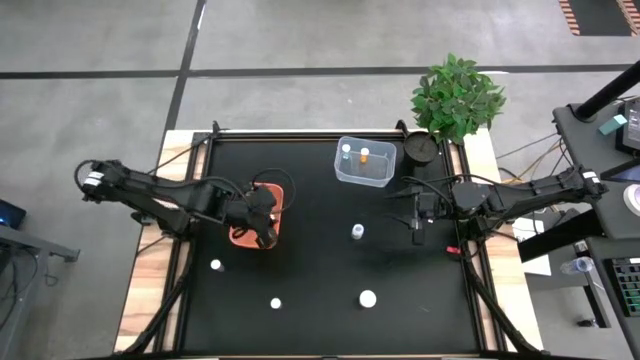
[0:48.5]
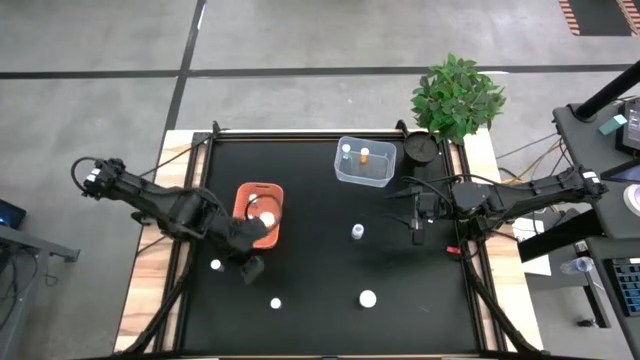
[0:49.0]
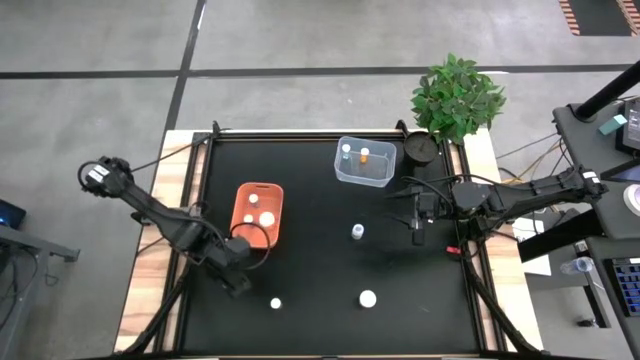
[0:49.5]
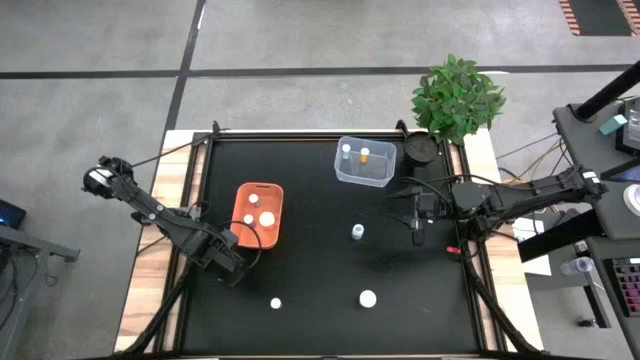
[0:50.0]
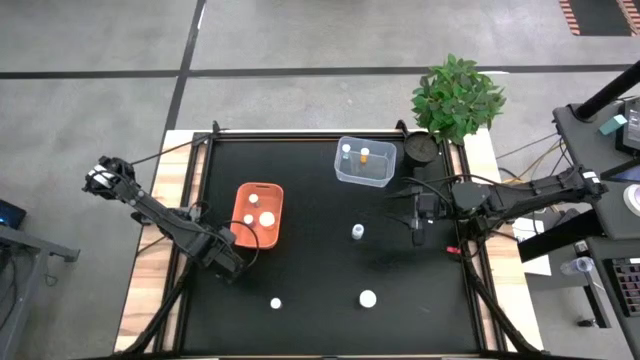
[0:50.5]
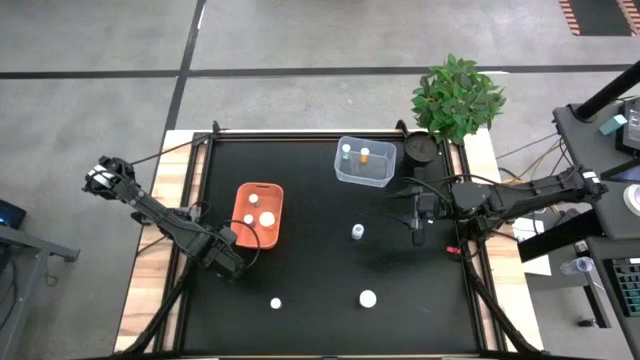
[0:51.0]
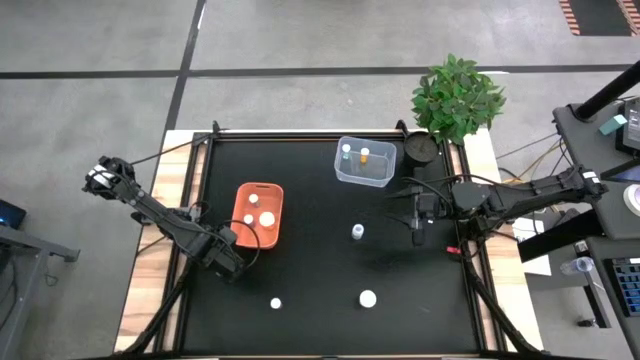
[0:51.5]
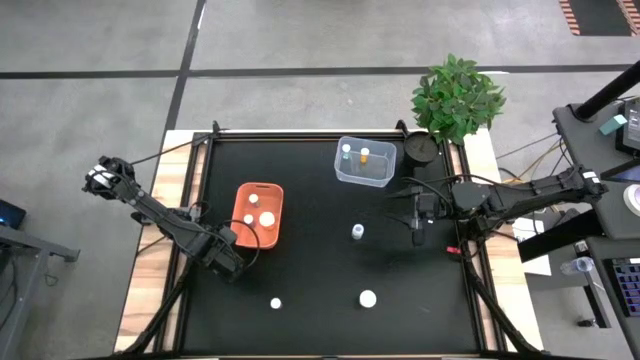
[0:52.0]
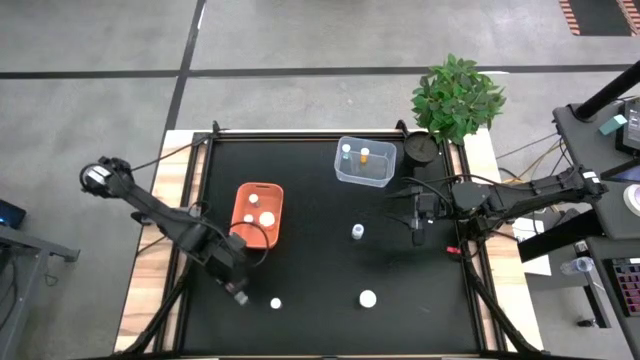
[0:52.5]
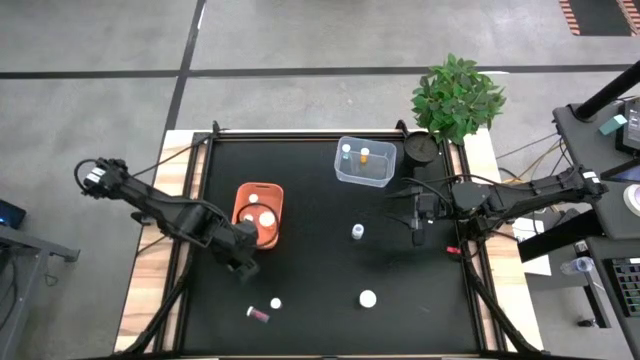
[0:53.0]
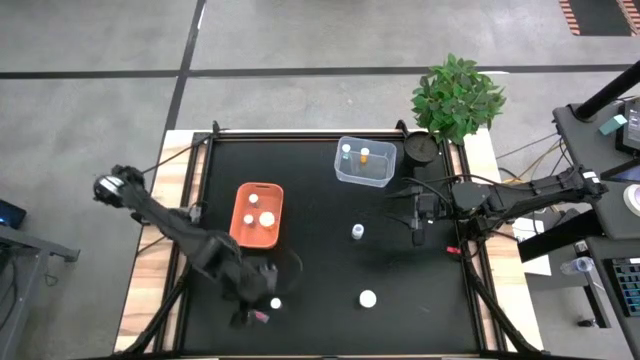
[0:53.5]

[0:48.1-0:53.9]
Task: Pick and place medicine bottles into bin by pill shape (circle, oval)
Put the blue capsule pill bottle into the orange bin

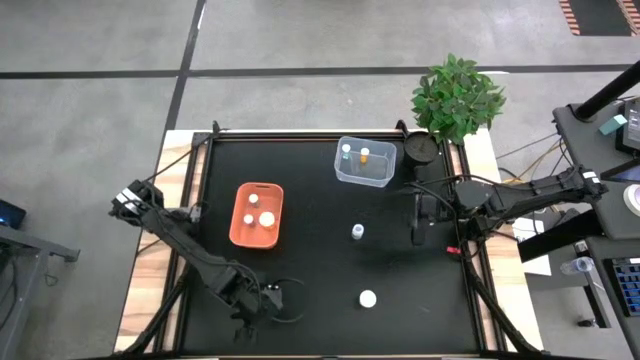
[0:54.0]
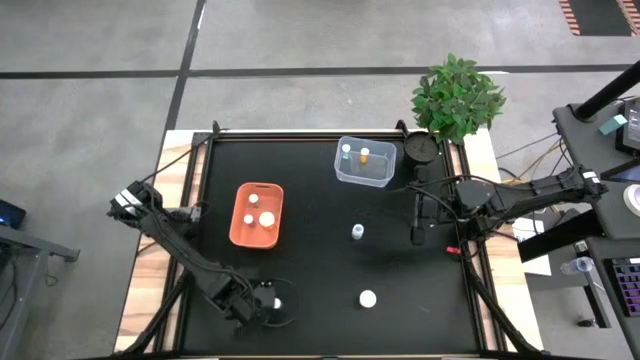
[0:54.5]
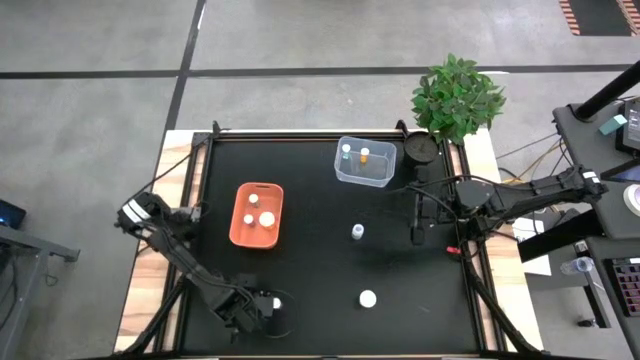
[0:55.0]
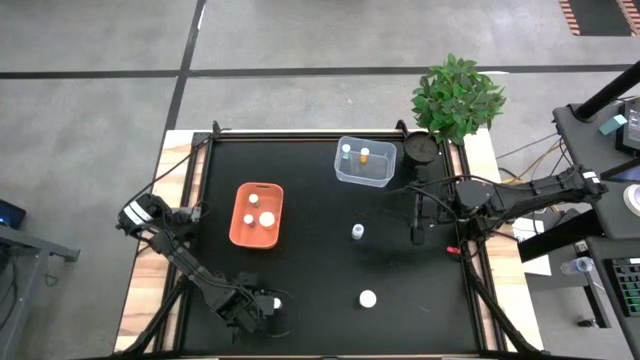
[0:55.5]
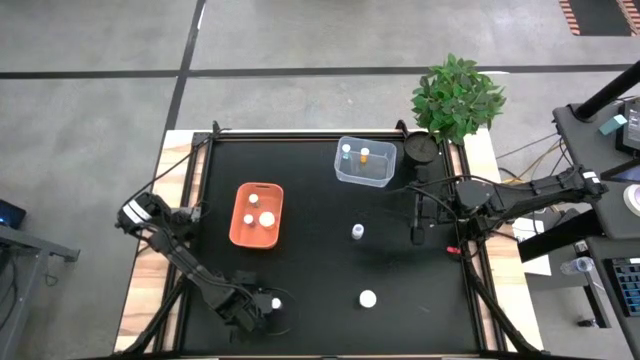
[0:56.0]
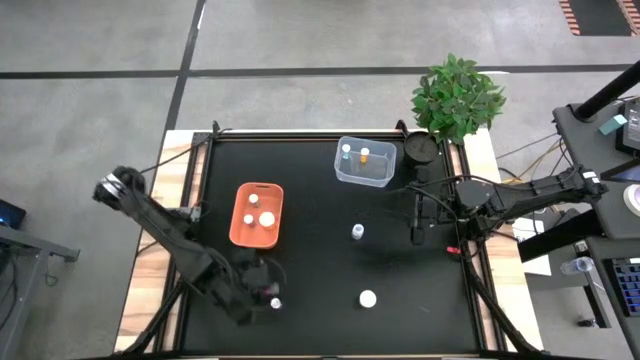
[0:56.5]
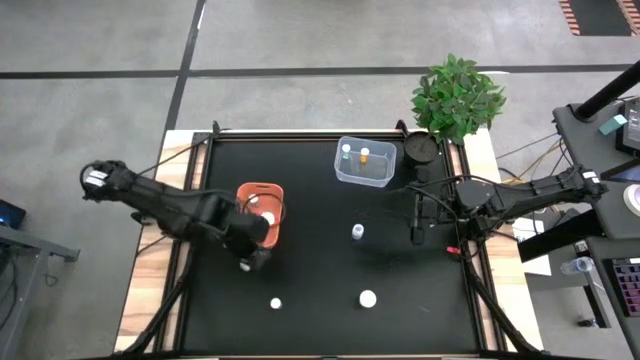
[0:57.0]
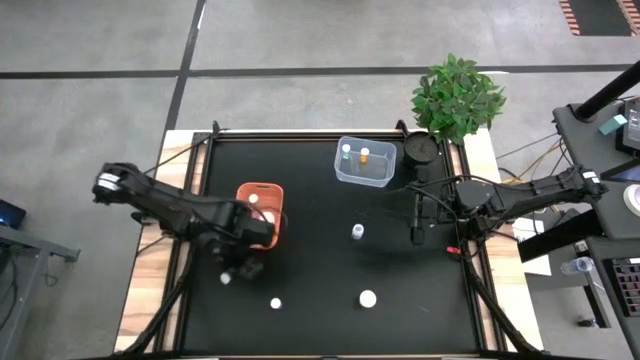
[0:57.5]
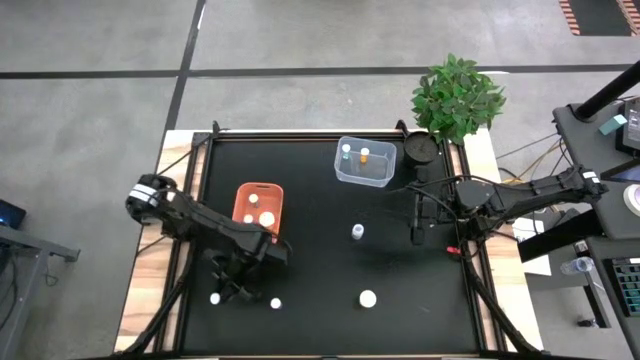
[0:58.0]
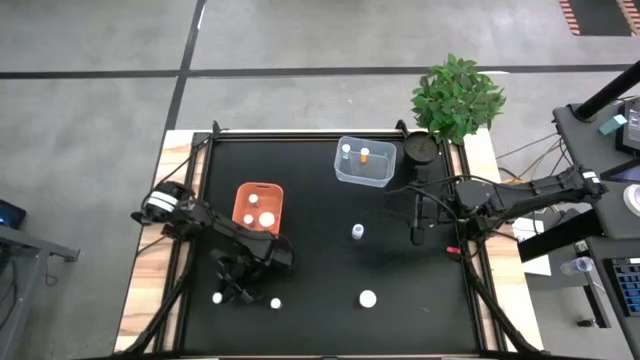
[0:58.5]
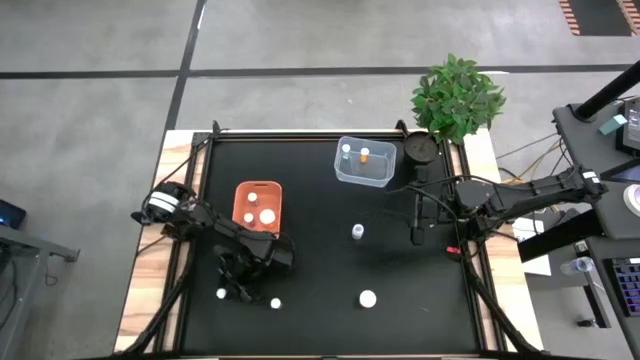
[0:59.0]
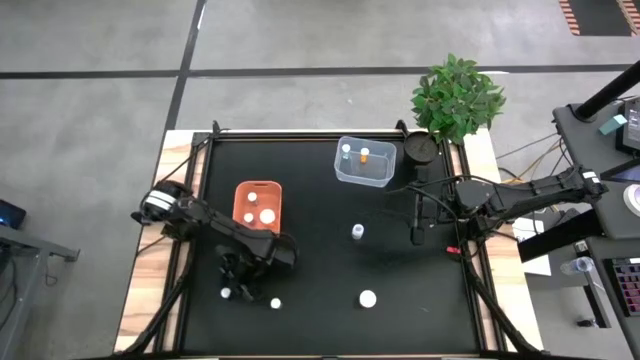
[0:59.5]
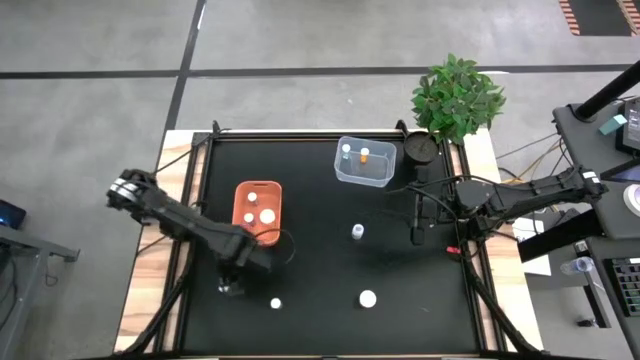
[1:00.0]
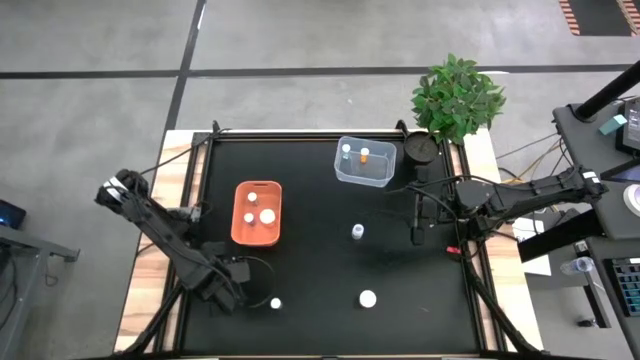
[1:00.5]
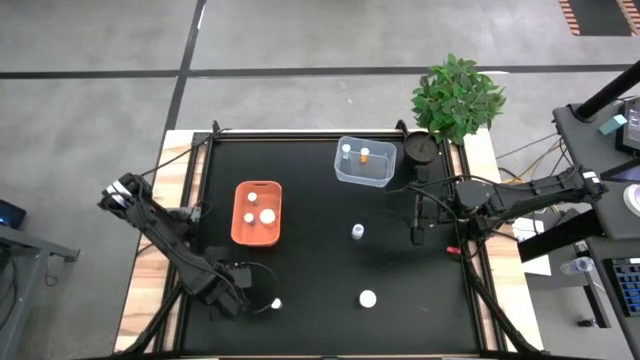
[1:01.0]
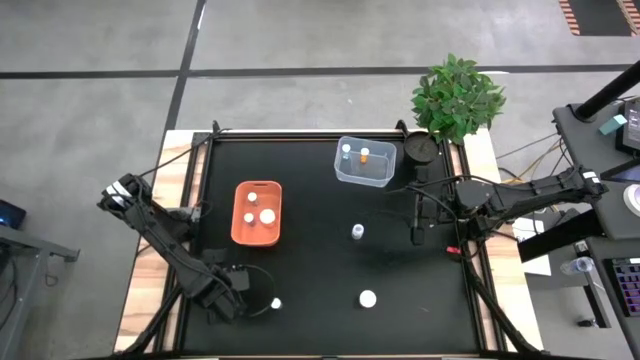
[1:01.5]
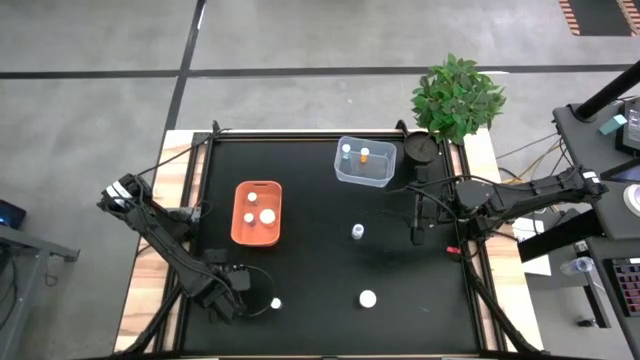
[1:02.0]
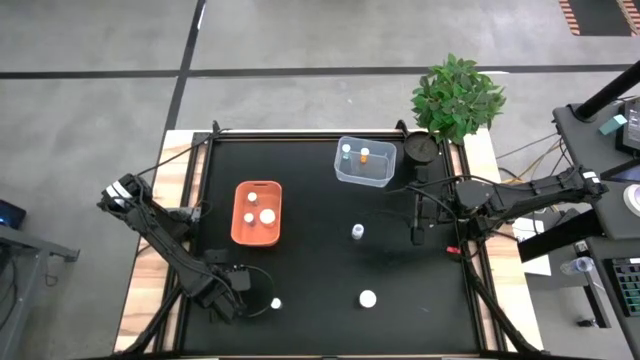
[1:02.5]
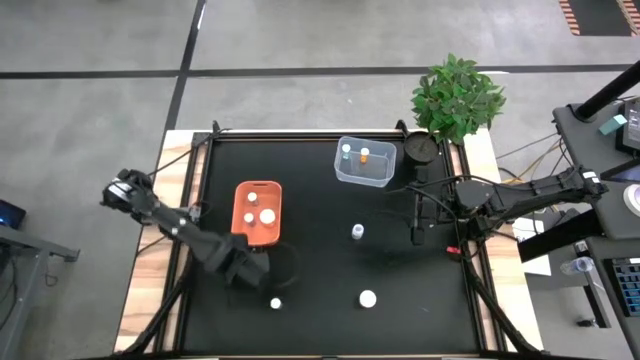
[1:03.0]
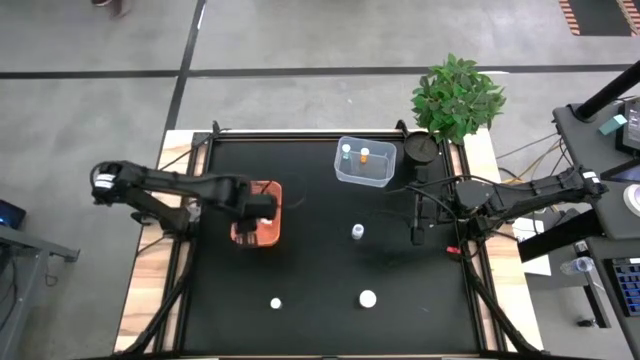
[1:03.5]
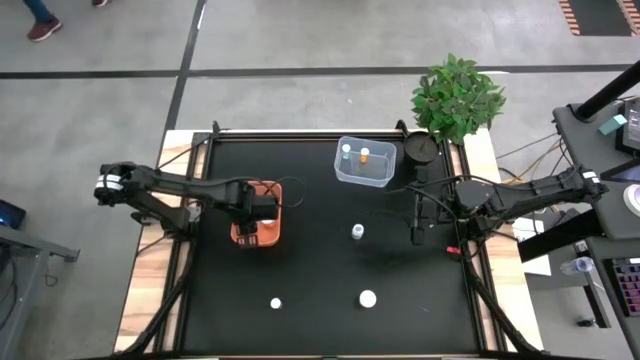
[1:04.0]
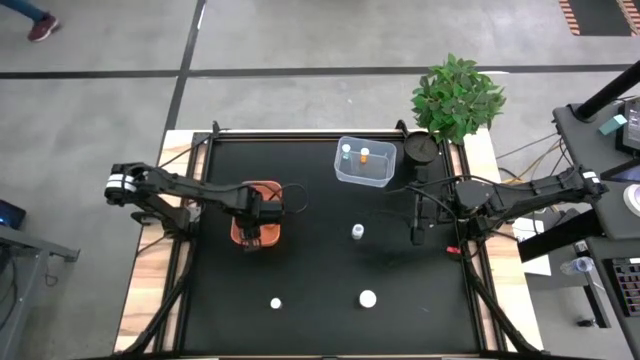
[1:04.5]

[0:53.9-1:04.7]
Put the blue capsule pill bottle into the orange bin

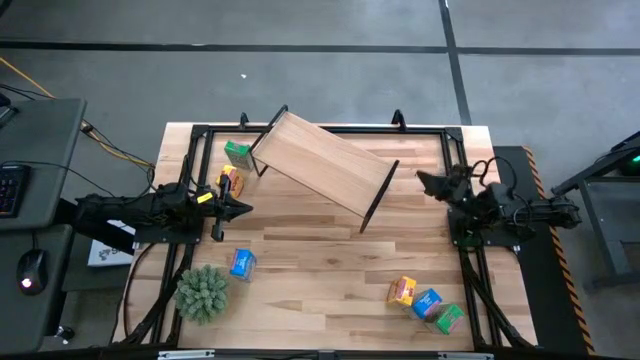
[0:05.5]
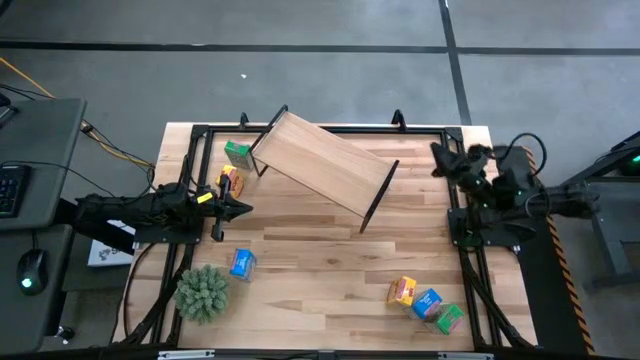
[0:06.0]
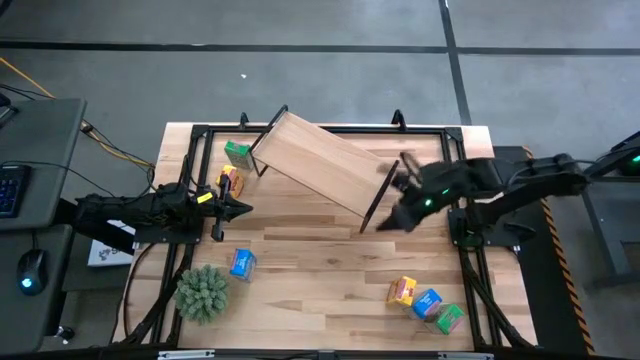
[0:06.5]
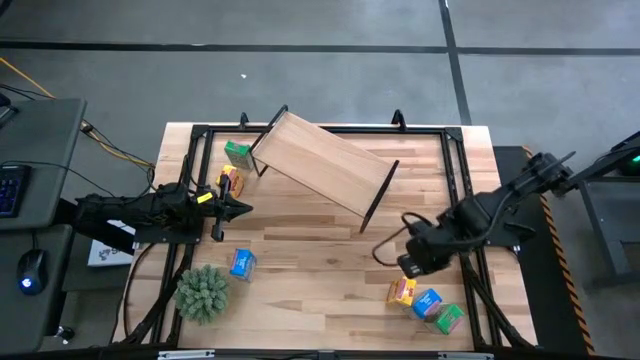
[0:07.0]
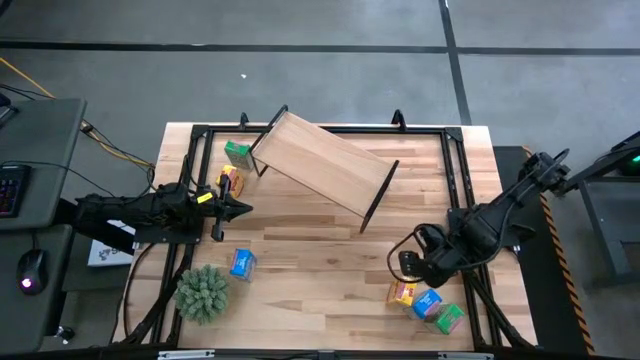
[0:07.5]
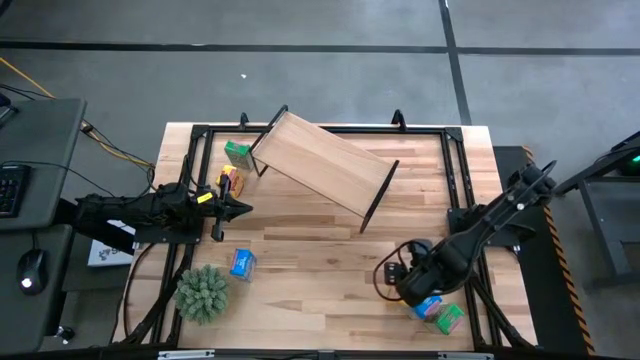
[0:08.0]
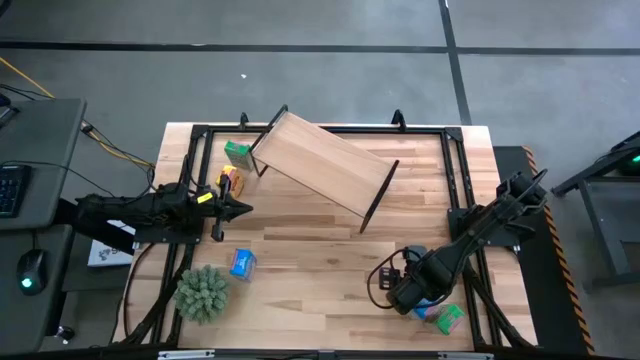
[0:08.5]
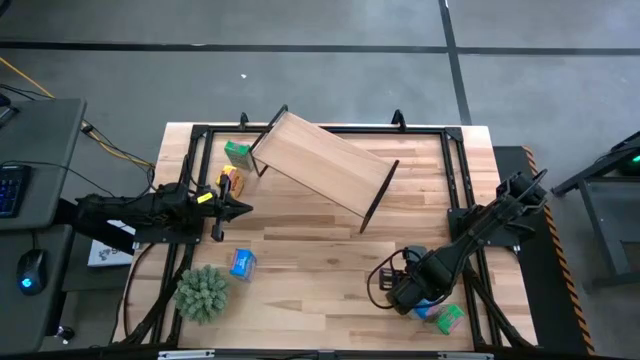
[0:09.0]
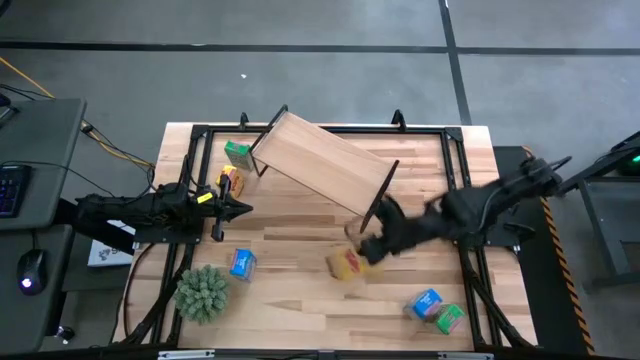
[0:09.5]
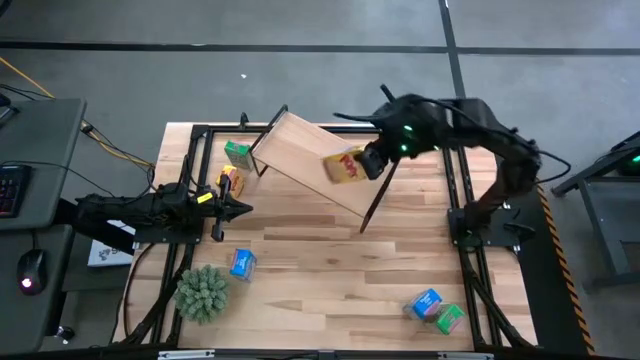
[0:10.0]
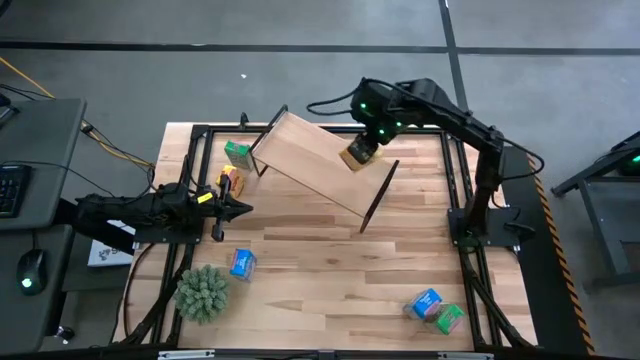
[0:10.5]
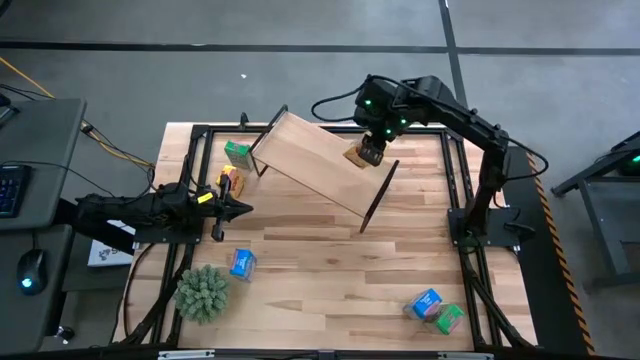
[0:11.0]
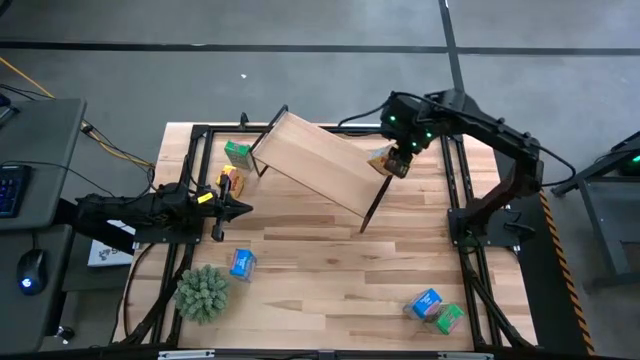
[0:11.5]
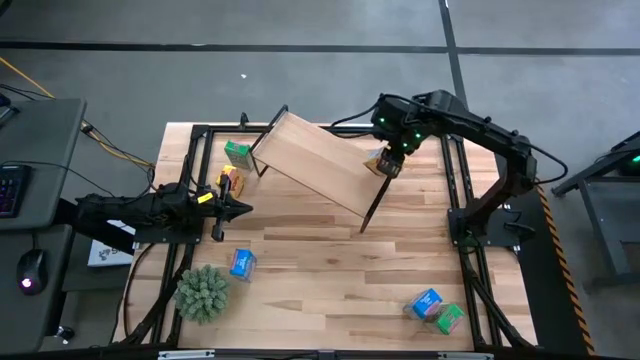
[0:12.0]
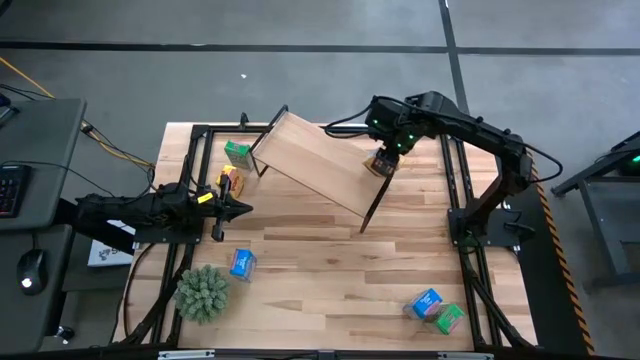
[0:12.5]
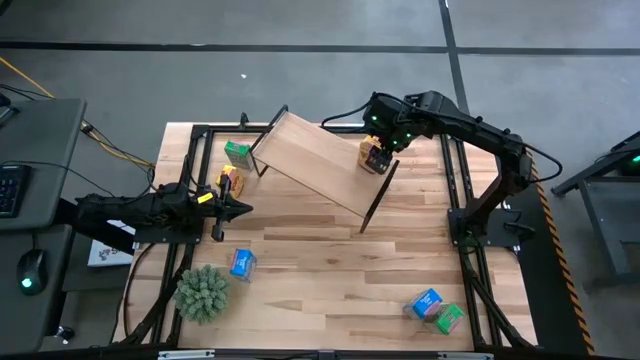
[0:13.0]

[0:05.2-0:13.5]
Task: Stack cereal on shelf
Put the bottom yellow cereal box on the shelf
